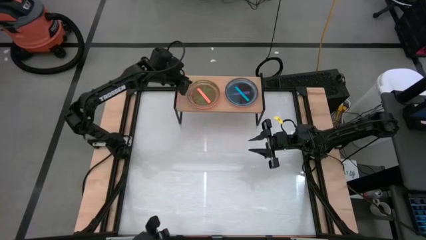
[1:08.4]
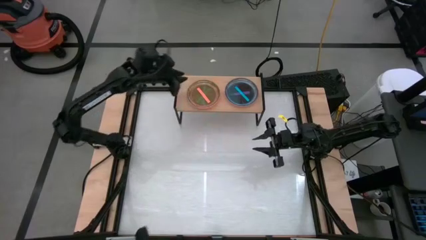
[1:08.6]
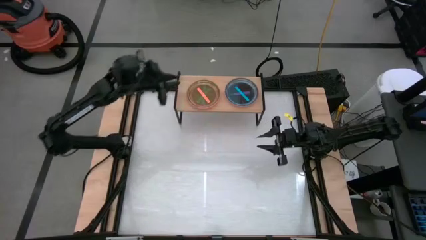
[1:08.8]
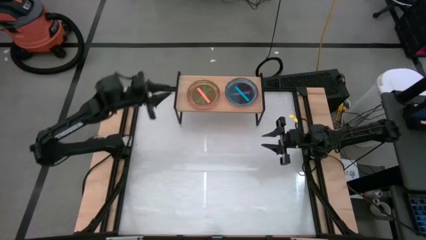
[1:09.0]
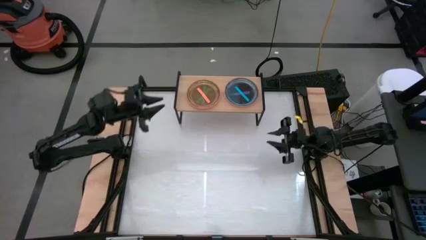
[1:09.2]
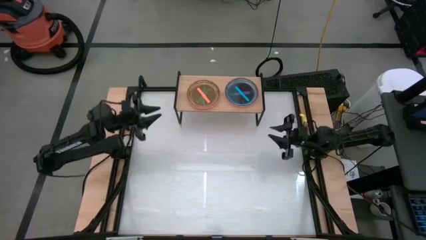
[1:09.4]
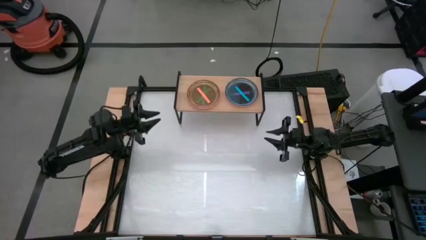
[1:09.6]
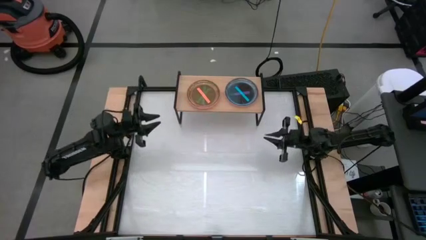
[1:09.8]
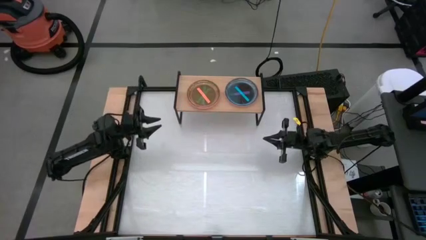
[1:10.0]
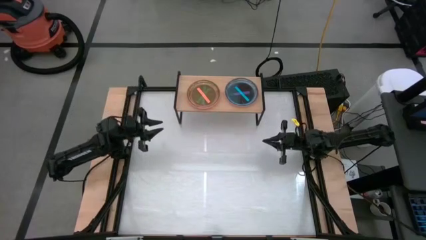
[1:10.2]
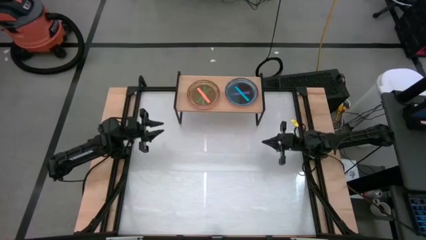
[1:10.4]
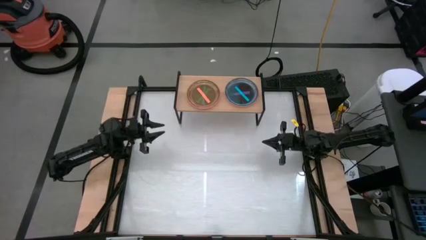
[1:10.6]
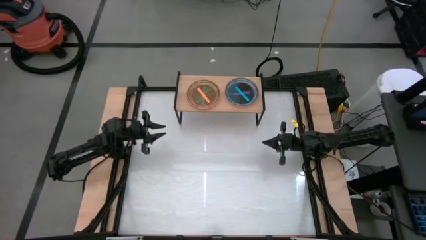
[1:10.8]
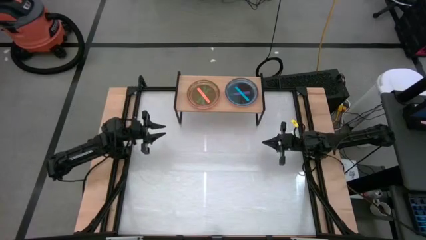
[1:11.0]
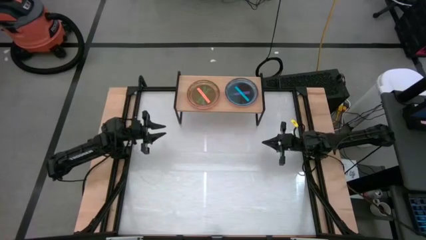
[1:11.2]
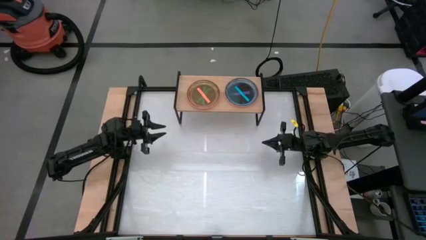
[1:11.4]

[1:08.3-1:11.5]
Task: Place and stack plates onto a shelf
Return to Home Position

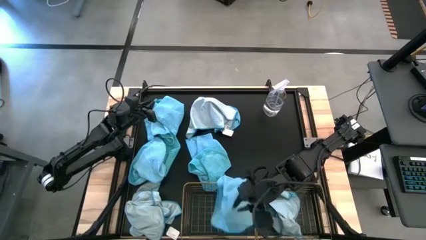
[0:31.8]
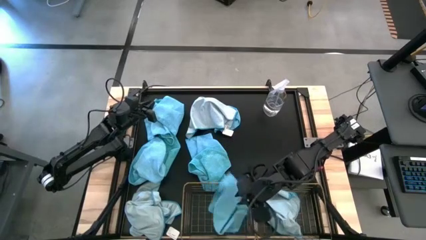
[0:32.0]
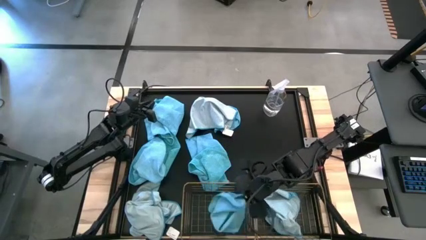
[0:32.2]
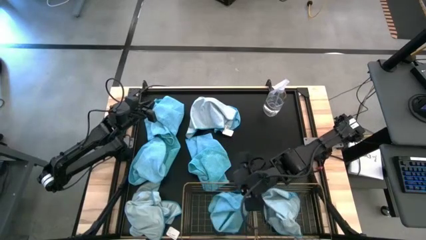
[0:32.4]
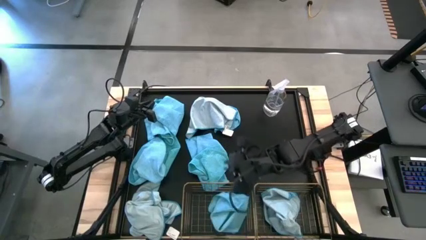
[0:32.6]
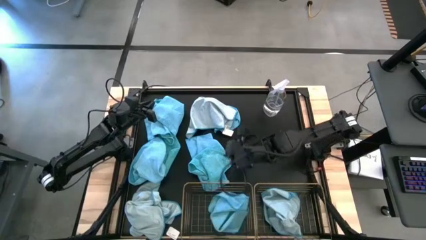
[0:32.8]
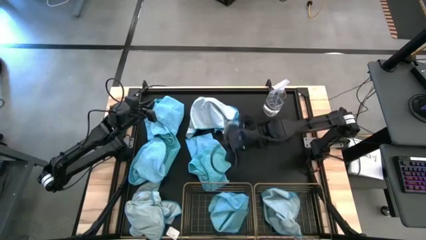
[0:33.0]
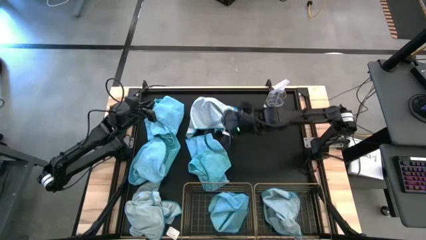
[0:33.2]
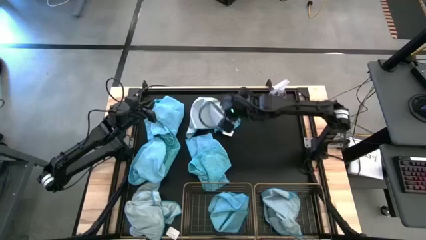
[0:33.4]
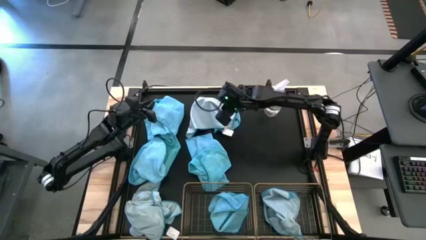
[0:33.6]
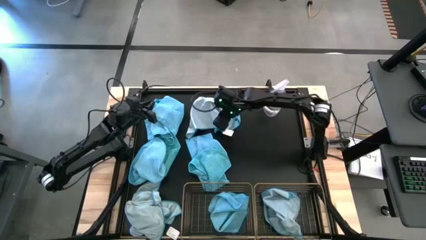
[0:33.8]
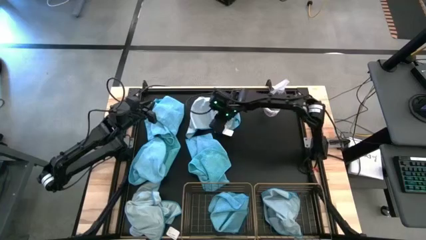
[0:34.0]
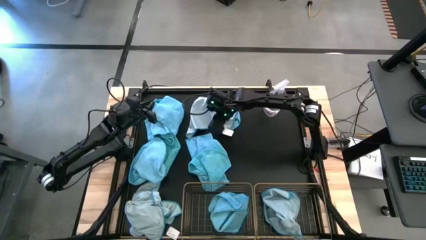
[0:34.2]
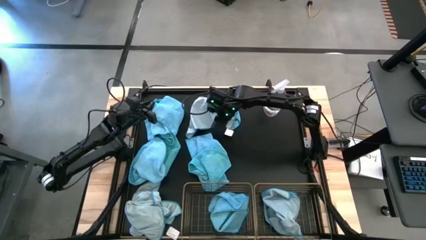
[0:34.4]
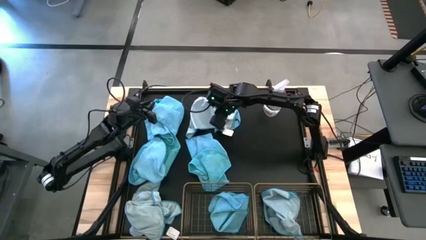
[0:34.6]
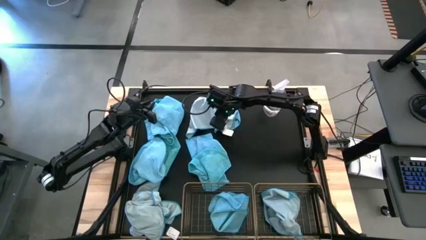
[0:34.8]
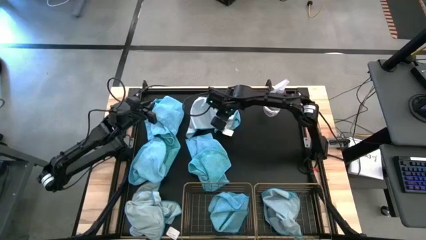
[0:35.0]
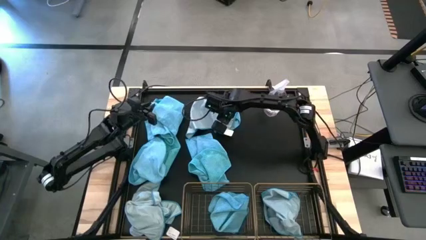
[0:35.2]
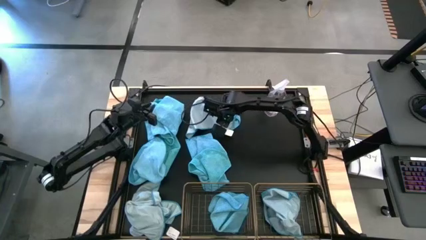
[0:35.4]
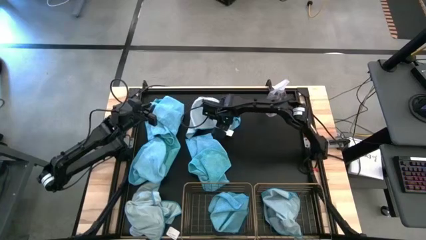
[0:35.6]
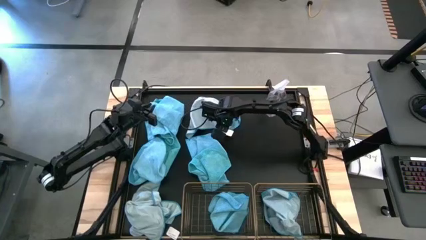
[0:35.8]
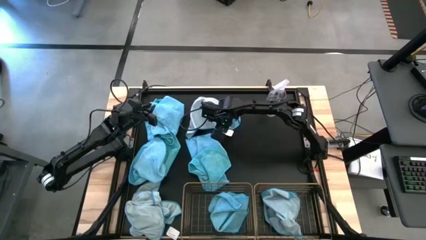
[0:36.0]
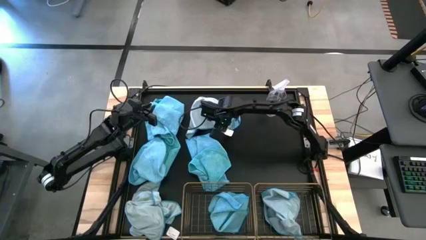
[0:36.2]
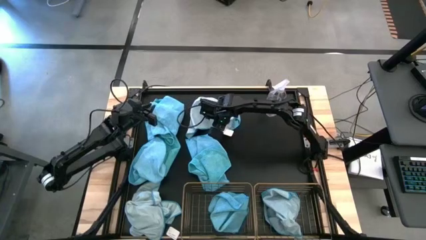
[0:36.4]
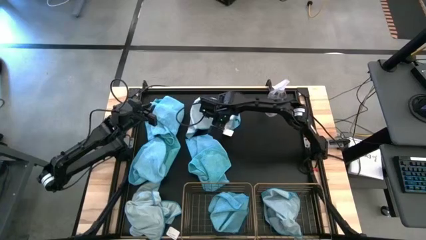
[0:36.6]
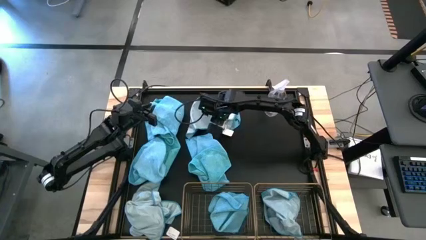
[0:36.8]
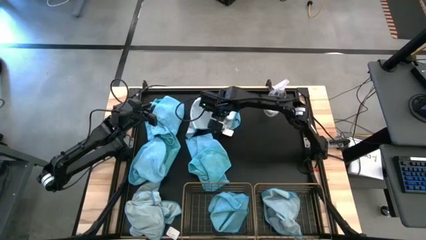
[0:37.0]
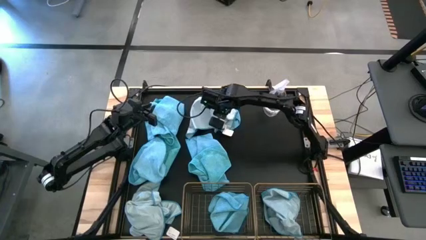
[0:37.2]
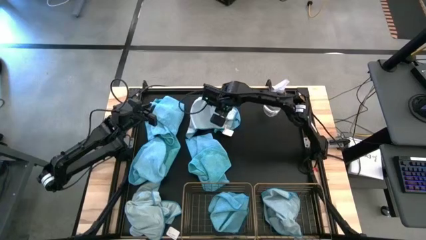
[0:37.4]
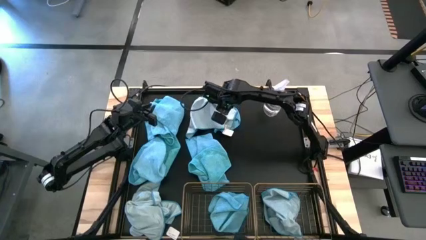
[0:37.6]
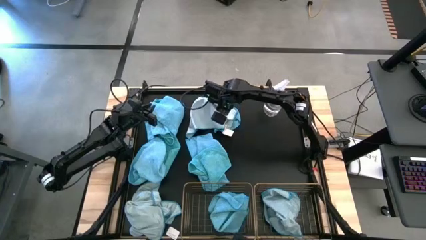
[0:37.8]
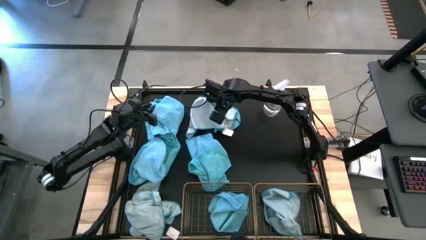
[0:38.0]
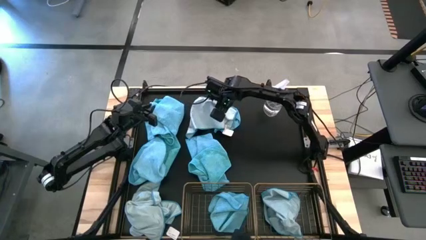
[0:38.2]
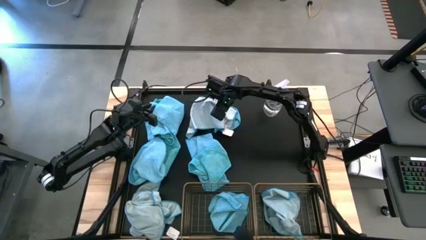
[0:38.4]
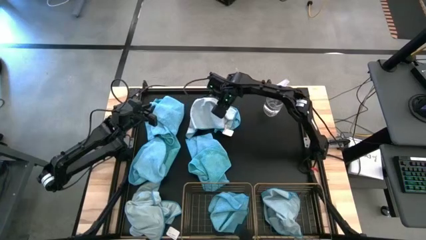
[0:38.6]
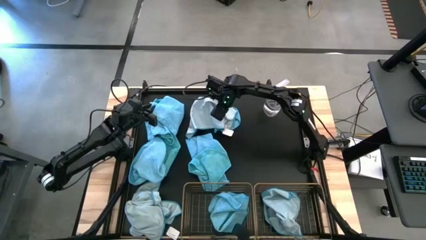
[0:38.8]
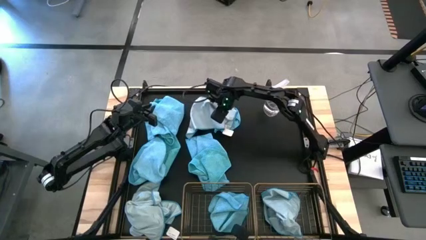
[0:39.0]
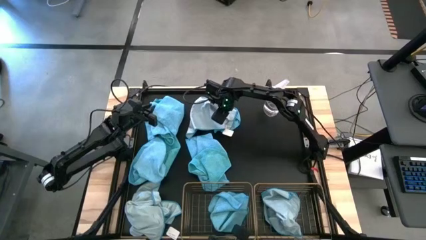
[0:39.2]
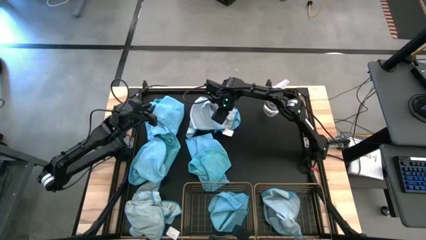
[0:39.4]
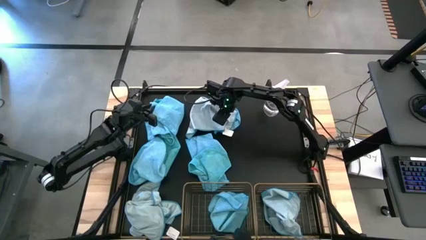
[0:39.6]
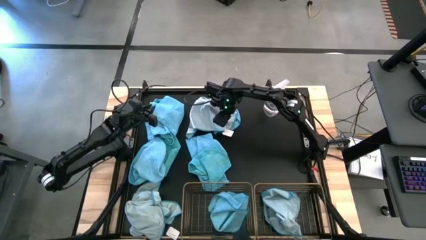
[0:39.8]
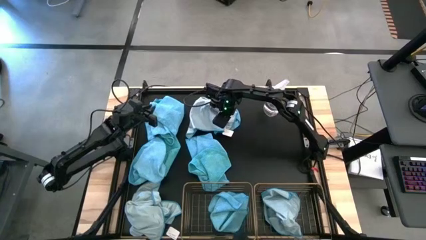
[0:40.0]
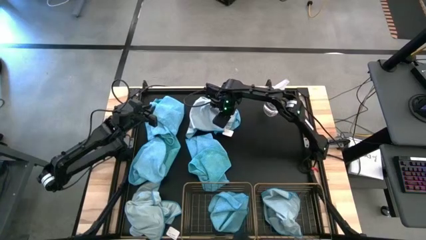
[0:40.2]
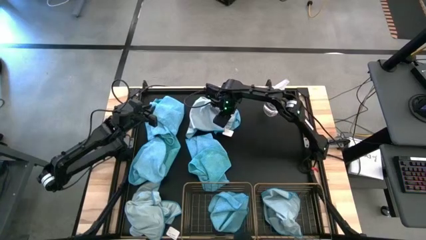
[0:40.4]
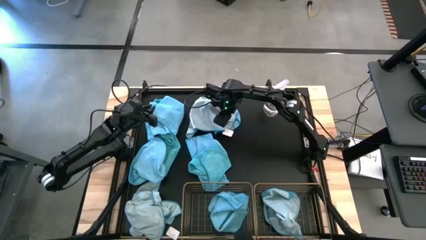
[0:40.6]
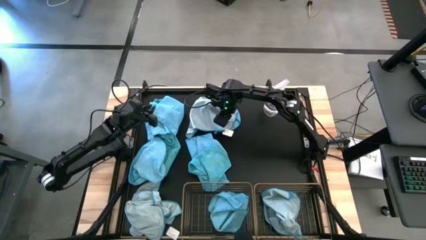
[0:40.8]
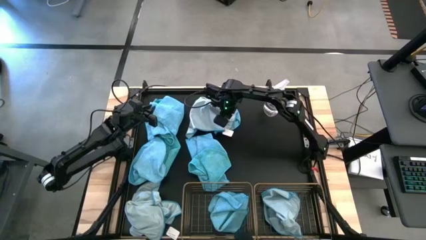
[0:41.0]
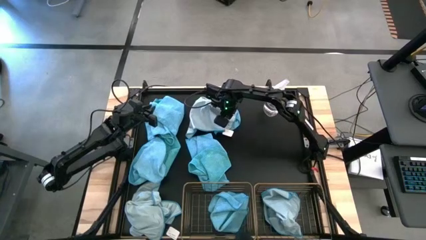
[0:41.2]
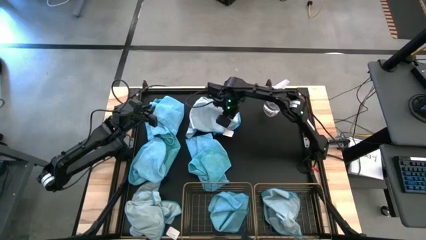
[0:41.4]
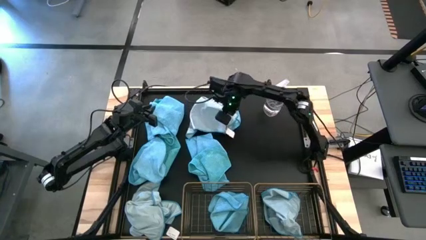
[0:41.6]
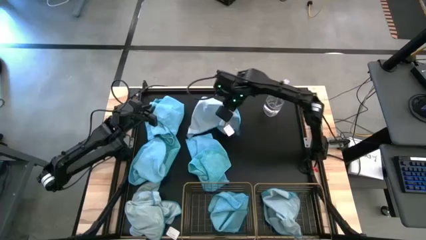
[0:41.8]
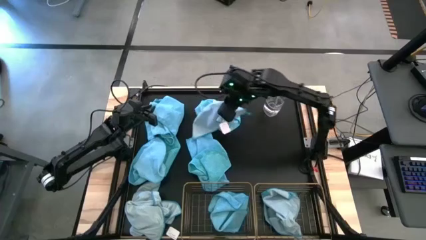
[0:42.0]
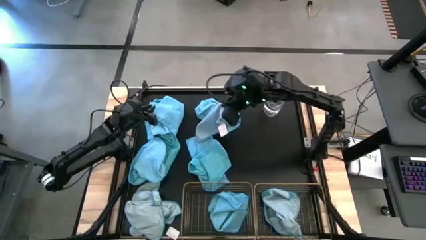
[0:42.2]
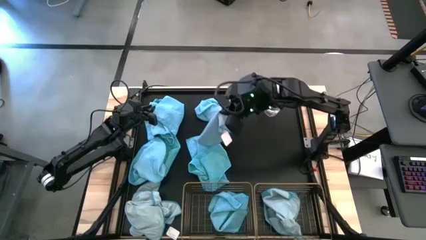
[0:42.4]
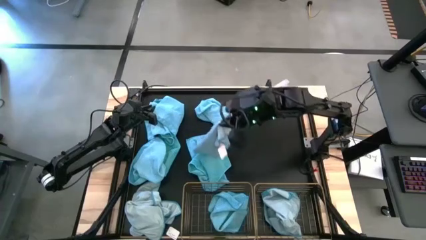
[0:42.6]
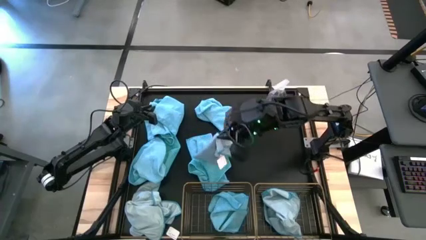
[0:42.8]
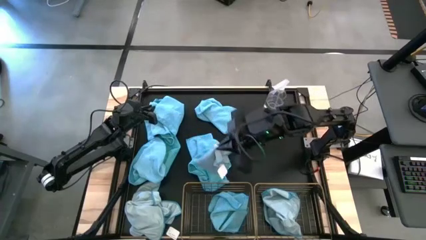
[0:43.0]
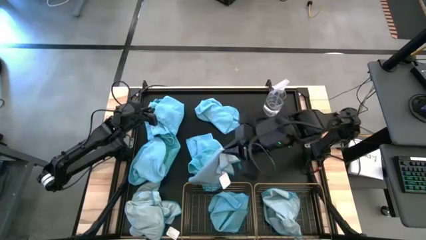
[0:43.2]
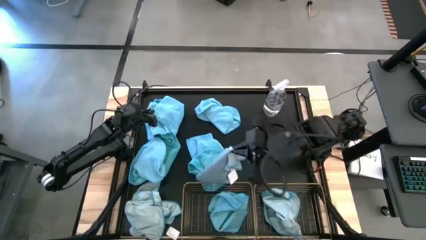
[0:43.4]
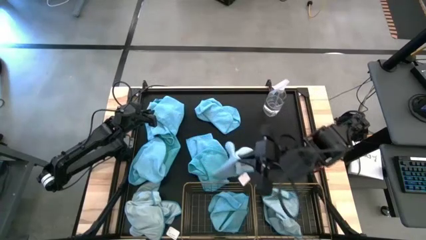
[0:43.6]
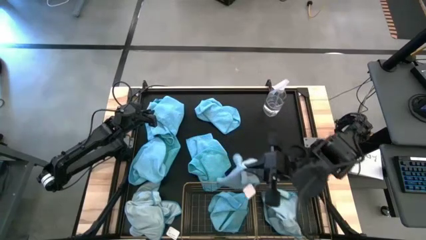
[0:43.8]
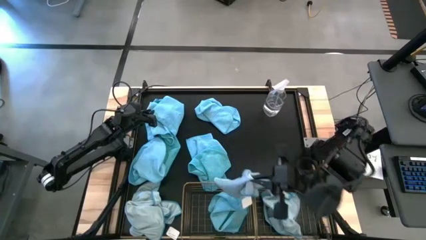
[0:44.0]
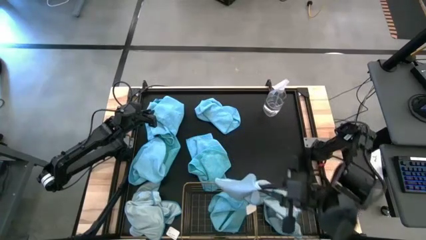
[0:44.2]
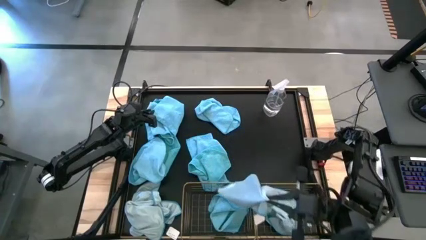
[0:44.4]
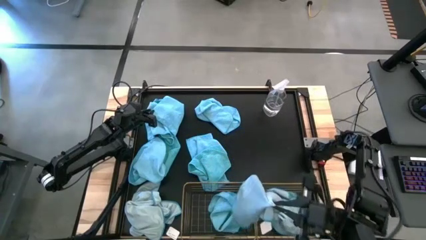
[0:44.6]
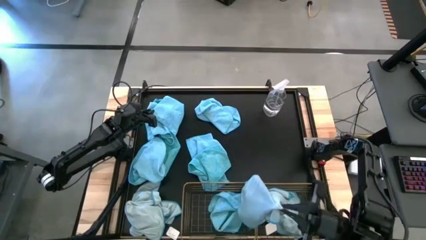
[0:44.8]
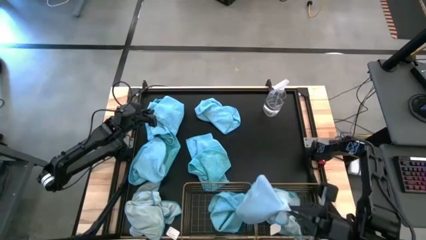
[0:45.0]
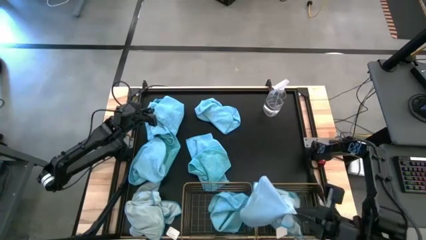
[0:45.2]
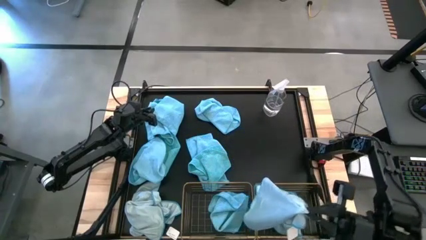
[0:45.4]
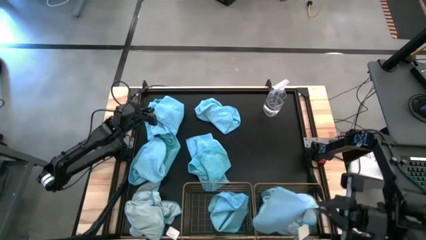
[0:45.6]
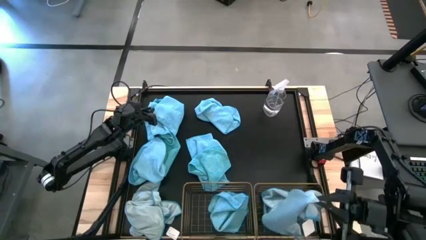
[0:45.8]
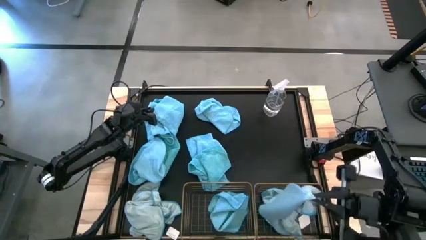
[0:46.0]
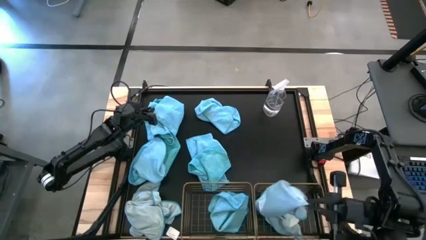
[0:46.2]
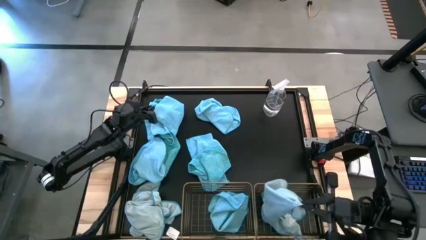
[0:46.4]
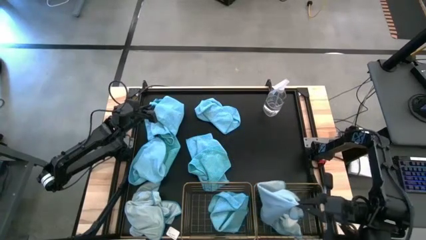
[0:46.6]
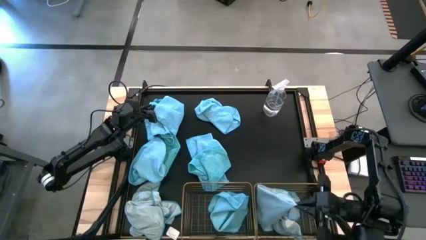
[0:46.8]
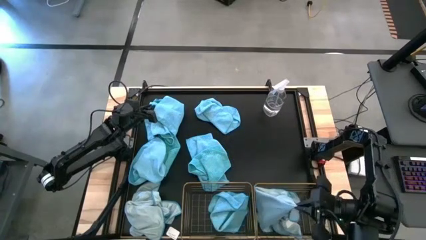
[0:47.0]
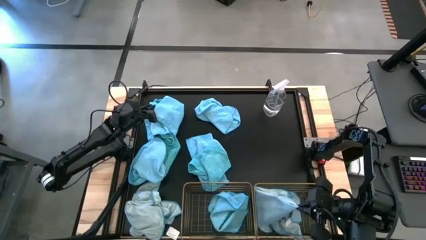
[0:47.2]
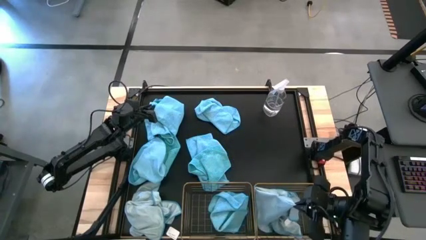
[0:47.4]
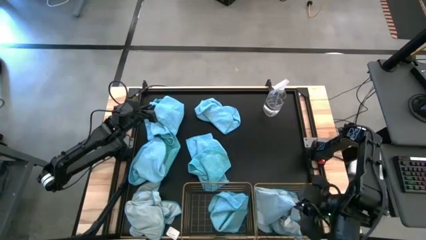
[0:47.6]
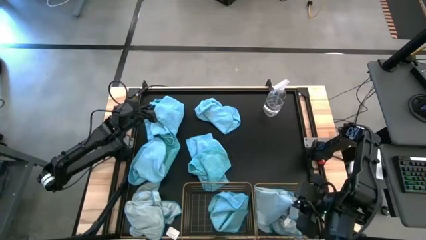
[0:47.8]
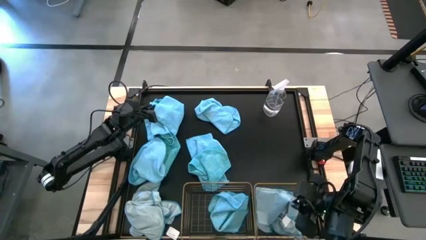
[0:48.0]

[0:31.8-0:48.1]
Task: Sort microfiber towel by color & place in baskets
Put the light blue towel into the right wire basket
